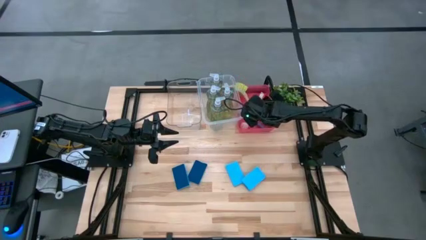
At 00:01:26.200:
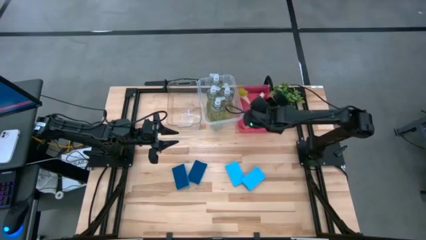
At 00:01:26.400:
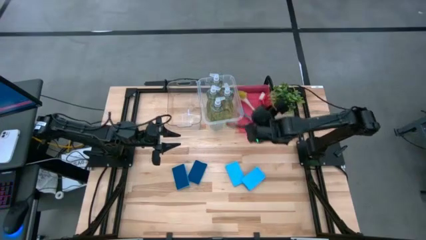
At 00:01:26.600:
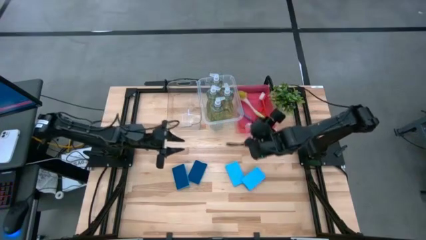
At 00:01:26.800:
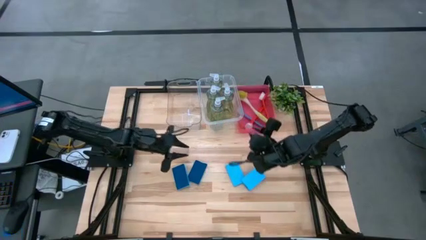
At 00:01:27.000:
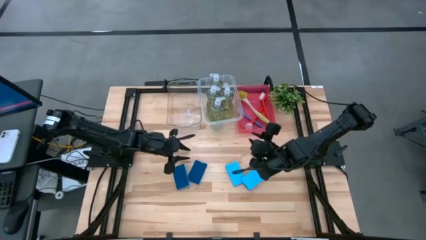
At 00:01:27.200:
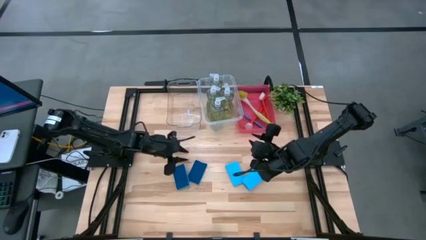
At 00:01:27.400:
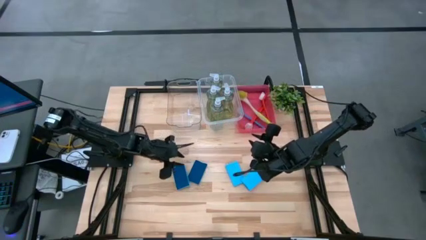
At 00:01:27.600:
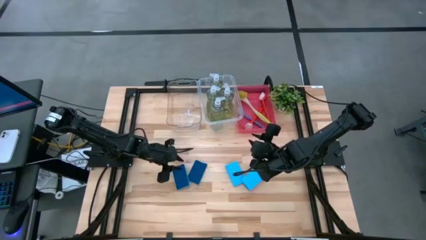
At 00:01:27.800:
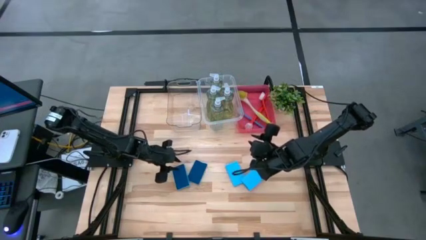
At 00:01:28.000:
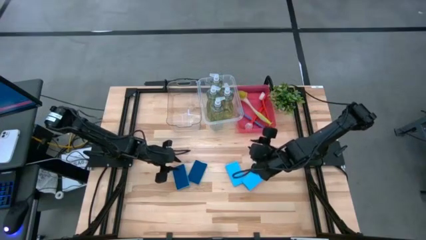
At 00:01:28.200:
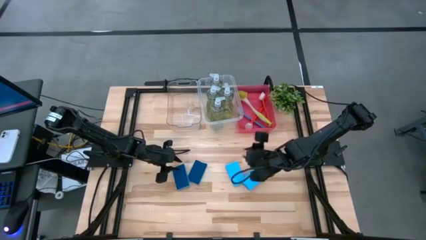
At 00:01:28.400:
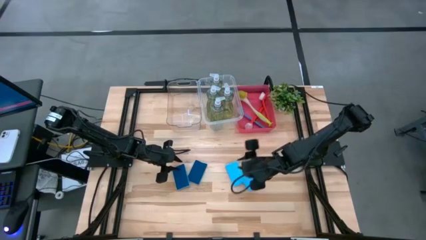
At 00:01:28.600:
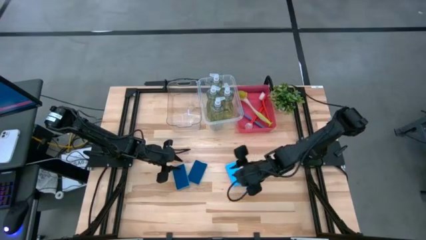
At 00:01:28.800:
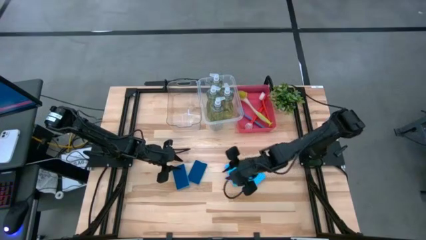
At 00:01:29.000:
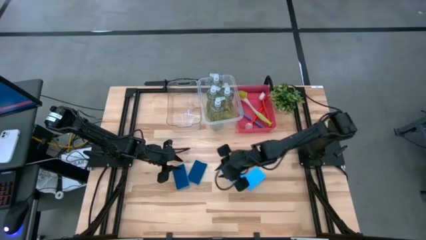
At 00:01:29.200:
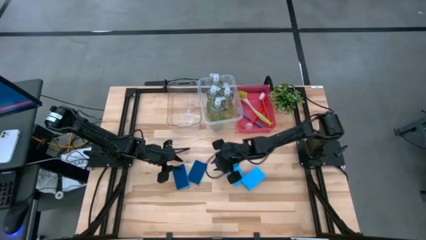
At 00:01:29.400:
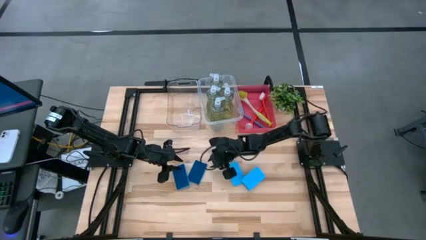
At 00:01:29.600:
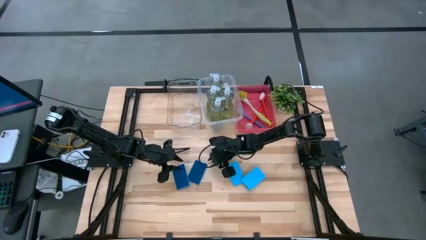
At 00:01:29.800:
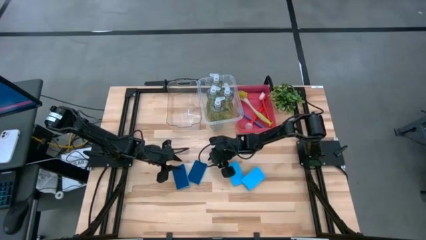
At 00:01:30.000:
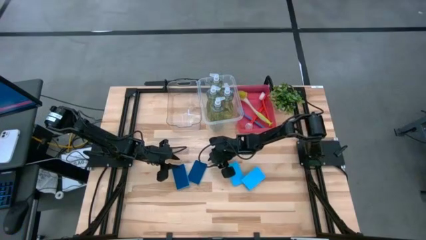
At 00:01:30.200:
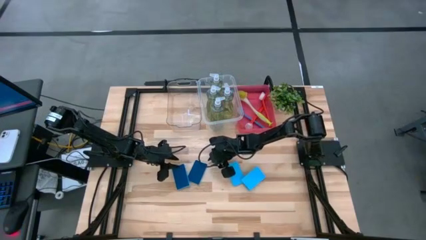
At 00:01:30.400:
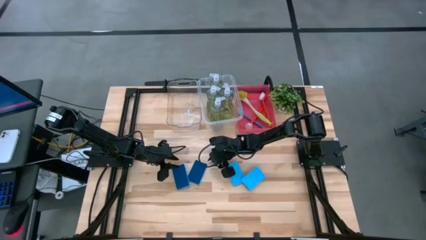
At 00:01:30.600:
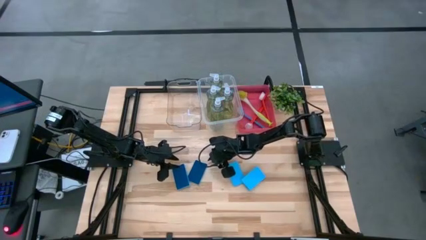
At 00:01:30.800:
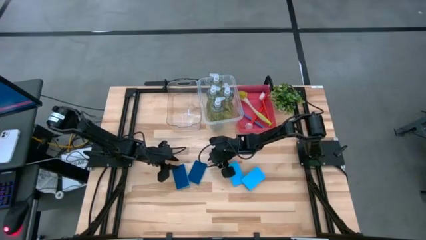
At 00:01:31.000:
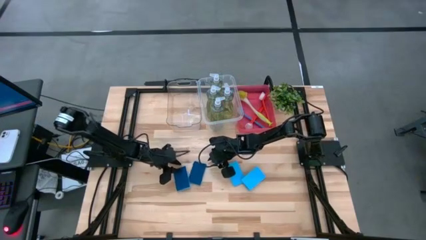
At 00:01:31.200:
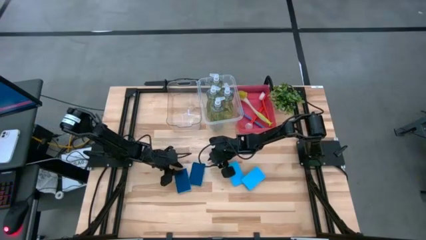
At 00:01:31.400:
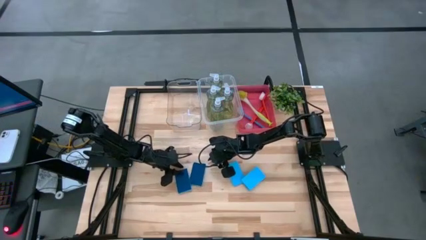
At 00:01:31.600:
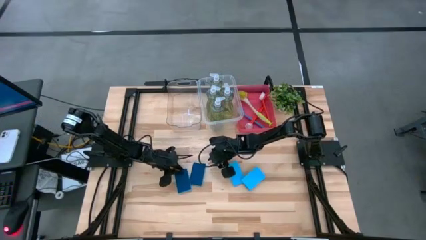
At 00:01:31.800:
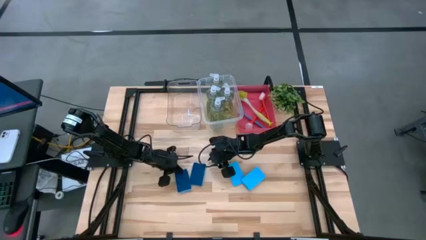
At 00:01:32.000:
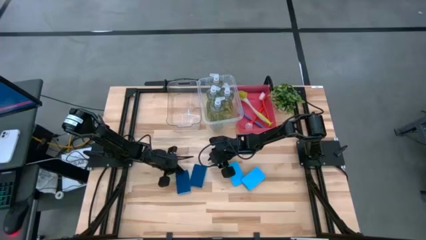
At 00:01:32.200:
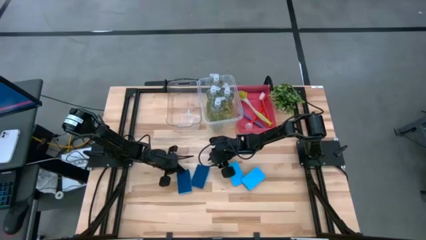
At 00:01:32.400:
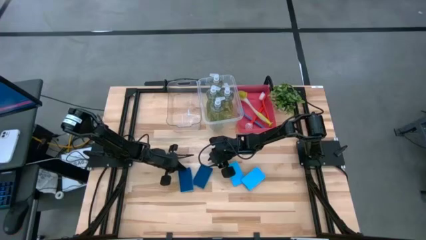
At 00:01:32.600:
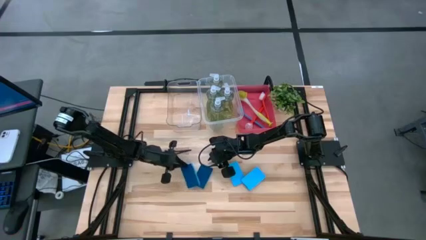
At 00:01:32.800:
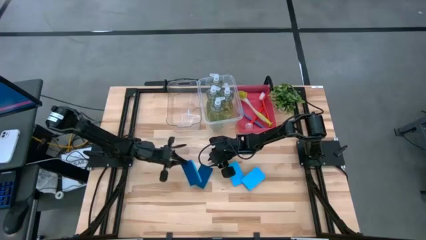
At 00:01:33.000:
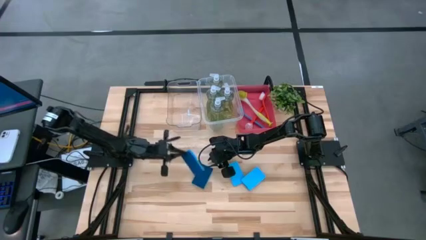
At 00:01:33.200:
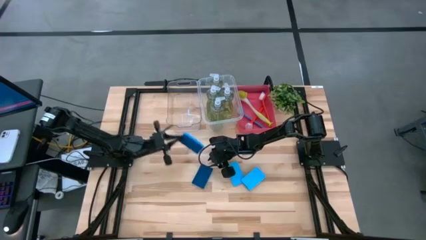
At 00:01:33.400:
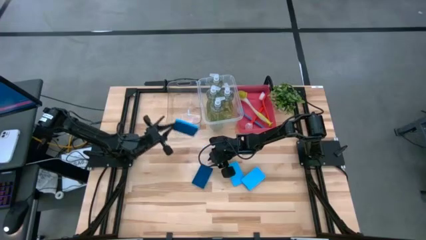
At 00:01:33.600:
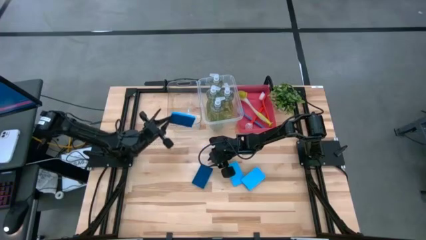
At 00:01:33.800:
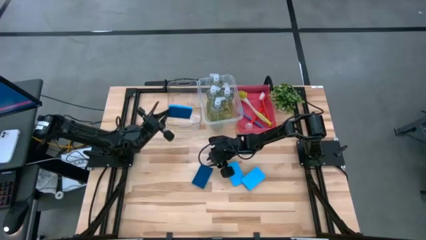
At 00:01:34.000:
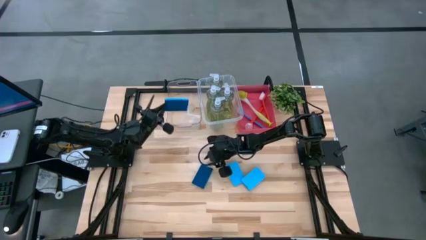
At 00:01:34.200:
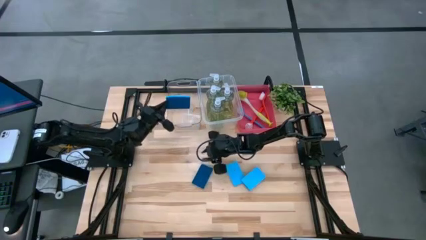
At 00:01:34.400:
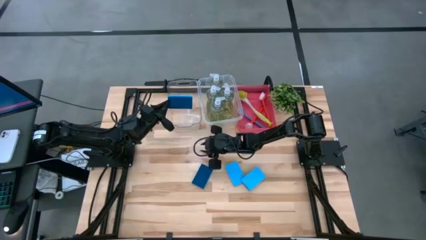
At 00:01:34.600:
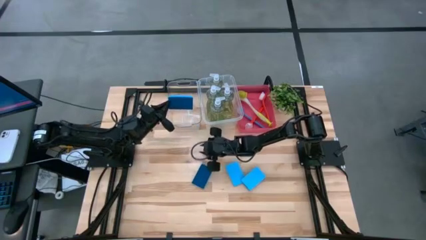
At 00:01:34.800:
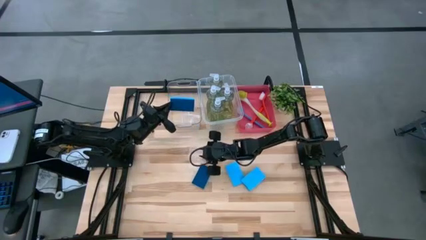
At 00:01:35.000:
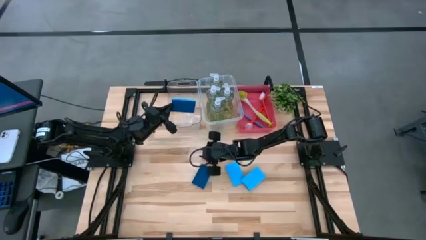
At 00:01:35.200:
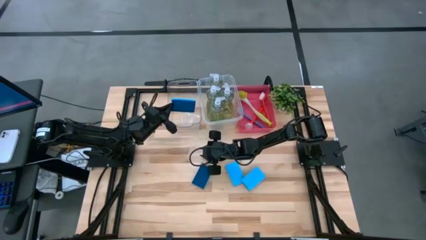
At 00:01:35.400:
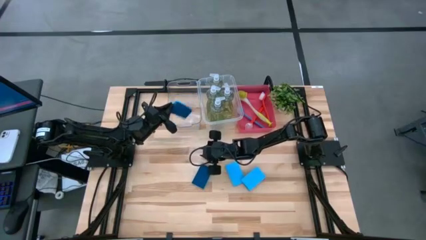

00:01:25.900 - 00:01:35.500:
Task: Pick & Place Kitchen Sink Supplies
Put the blue sponge into the left transparent bin

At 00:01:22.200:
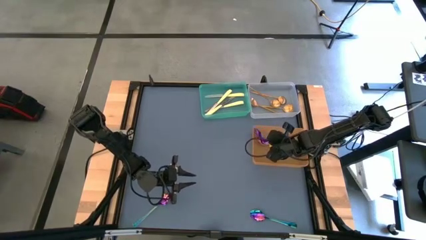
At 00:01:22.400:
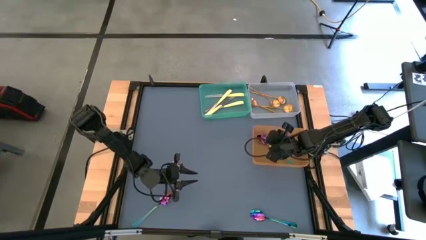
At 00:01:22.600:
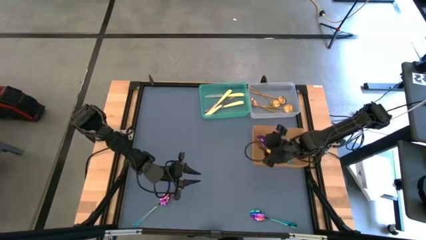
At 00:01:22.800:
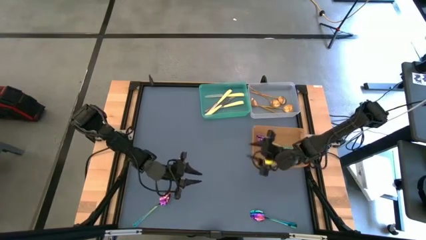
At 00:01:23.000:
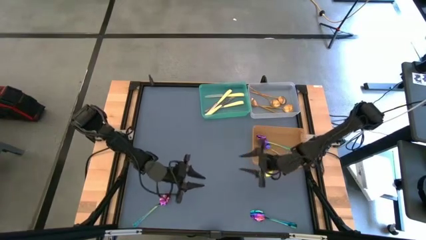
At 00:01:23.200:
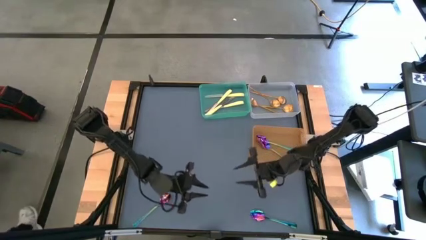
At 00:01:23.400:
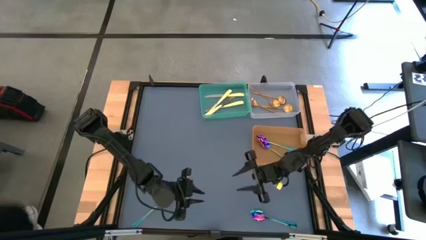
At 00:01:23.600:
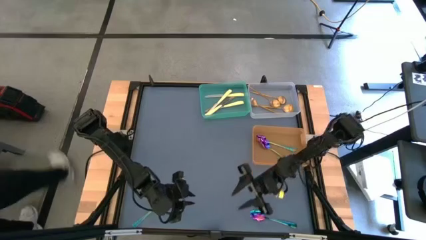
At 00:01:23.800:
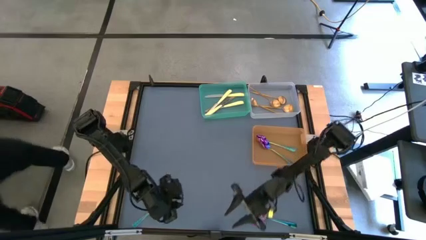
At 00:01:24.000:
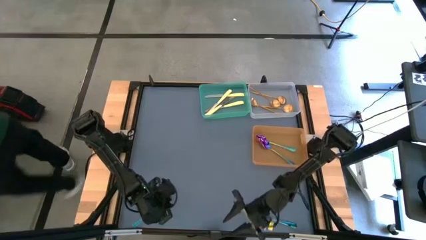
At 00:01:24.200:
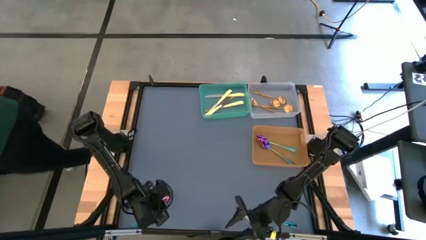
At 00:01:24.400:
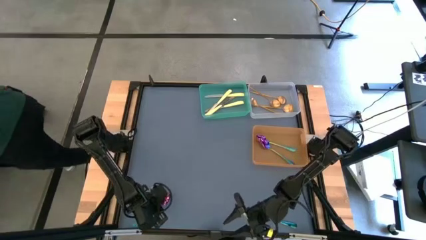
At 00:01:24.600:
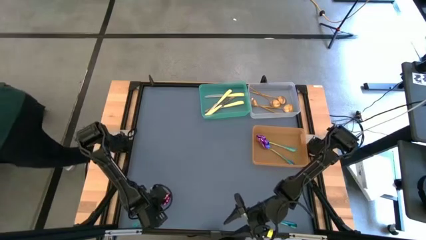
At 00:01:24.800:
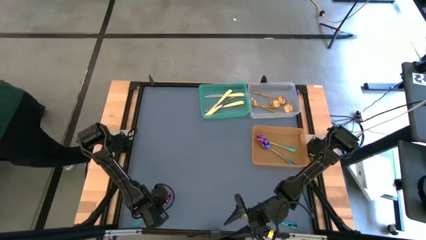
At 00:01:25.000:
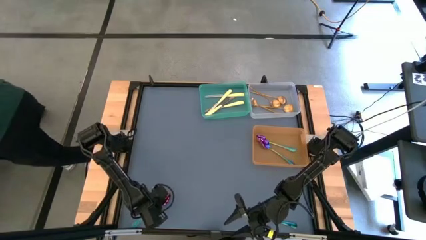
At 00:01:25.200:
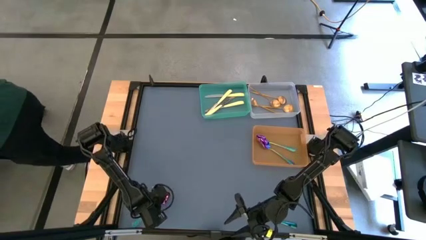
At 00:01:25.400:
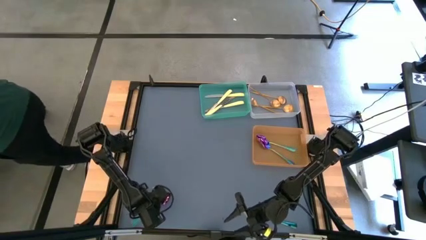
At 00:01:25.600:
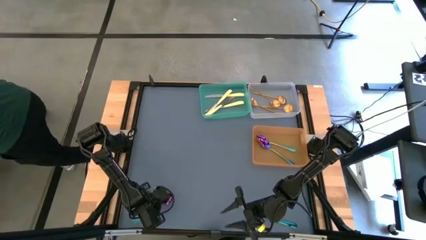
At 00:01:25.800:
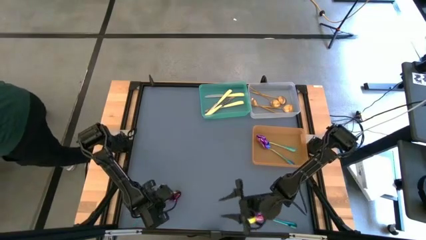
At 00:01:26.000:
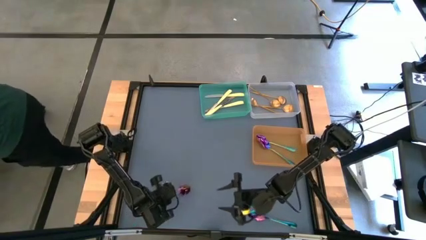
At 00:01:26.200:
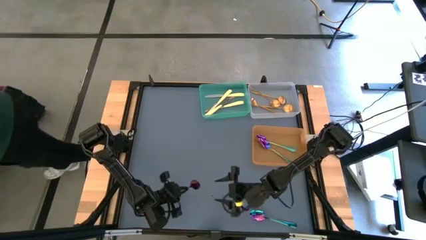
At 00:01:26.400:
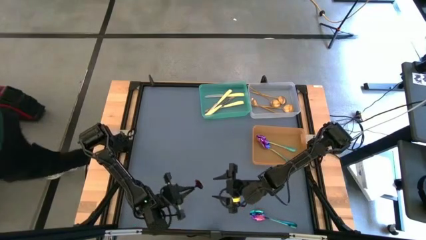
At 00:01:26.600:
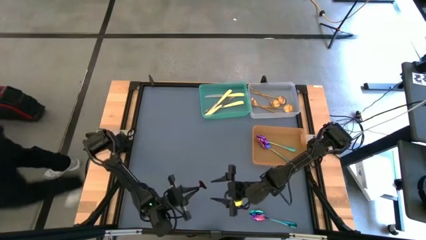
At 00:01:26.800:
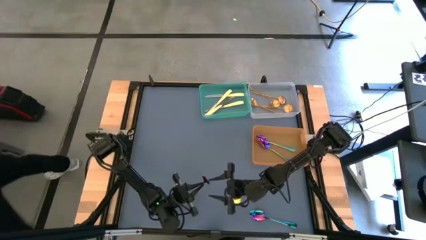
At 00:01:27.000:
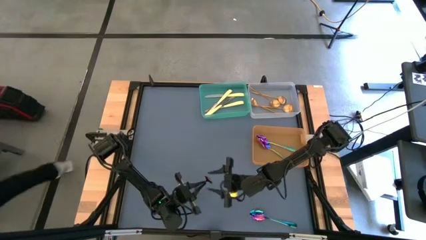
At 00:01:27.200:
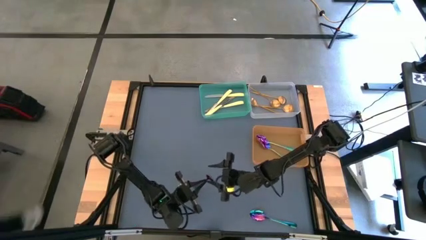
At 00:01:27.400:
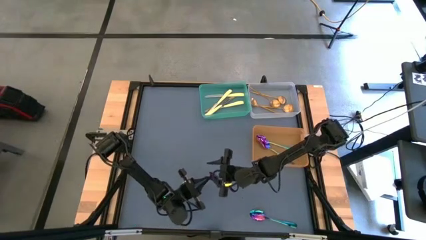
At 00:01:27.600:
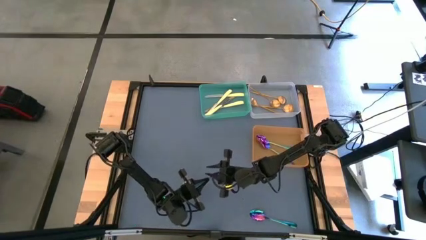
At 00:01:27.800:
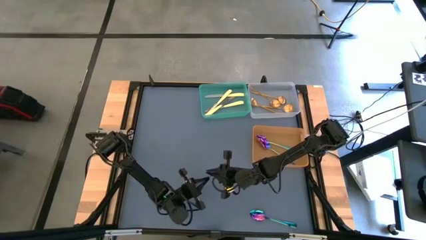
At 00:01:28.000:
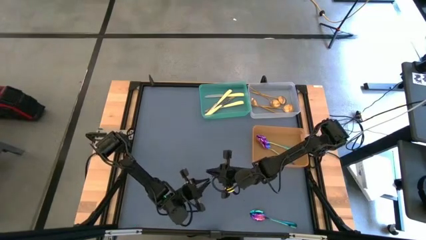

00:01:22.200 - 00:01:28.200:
Task: Sort silverware by color (type)
Put the iridescent spoon into the orange bin
